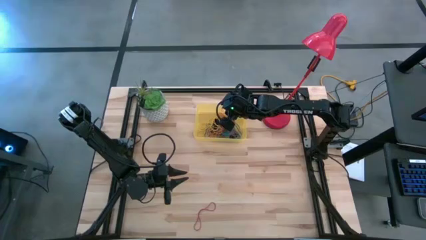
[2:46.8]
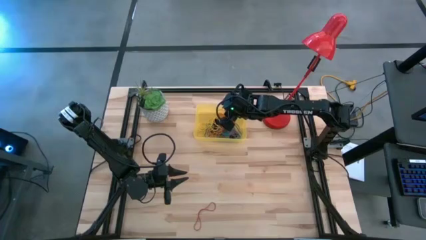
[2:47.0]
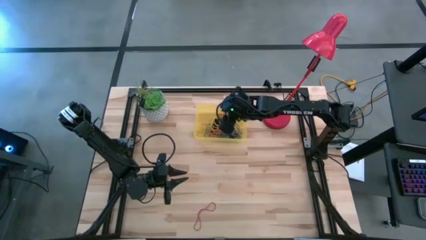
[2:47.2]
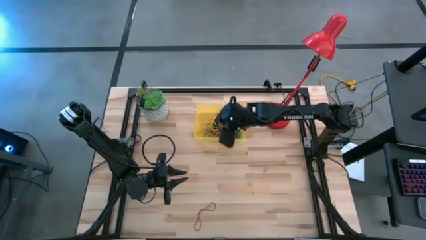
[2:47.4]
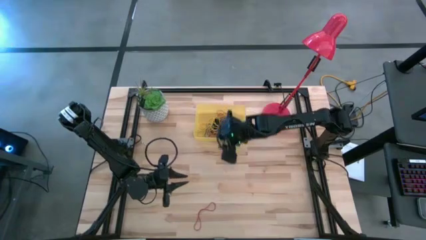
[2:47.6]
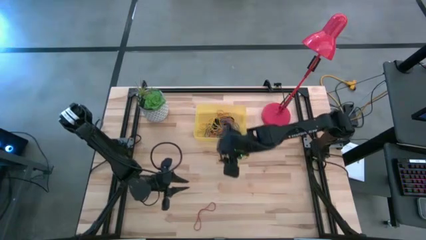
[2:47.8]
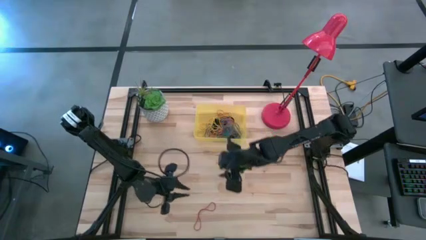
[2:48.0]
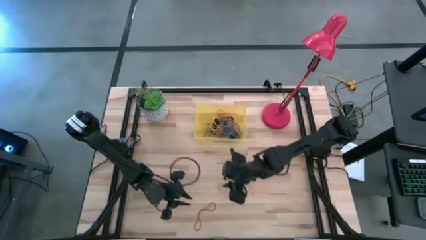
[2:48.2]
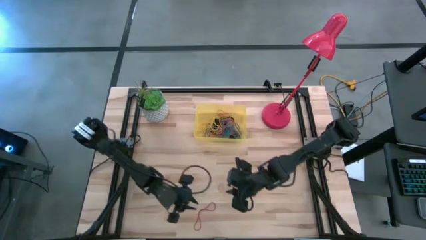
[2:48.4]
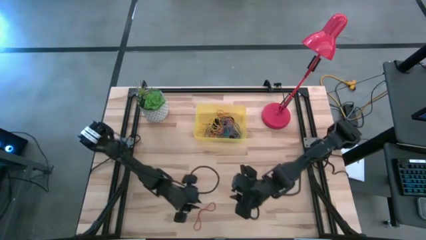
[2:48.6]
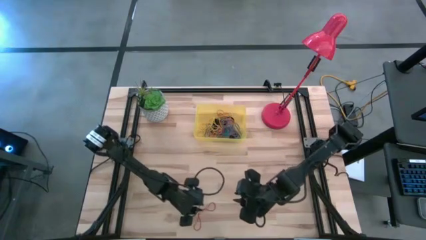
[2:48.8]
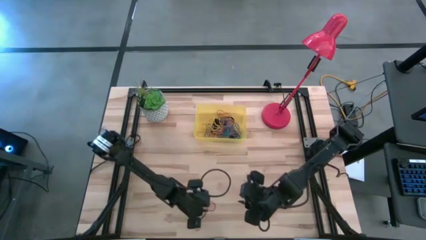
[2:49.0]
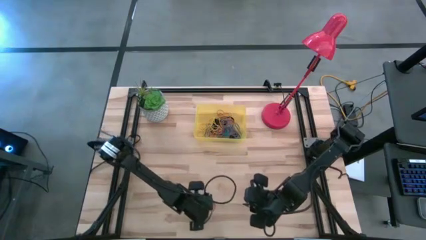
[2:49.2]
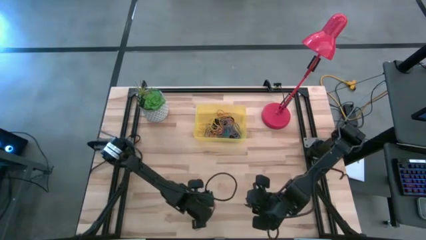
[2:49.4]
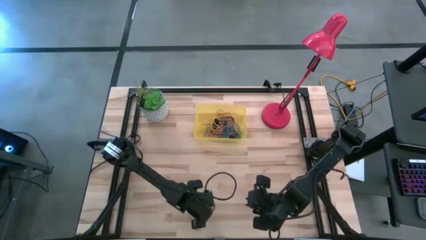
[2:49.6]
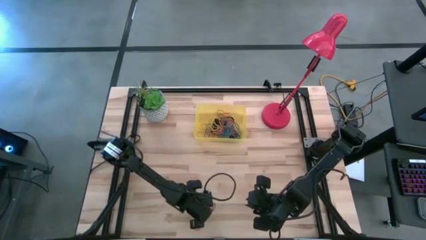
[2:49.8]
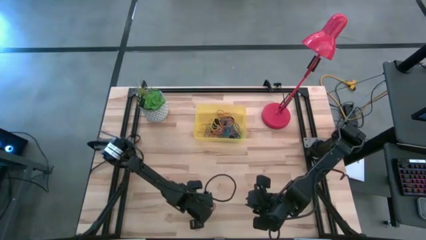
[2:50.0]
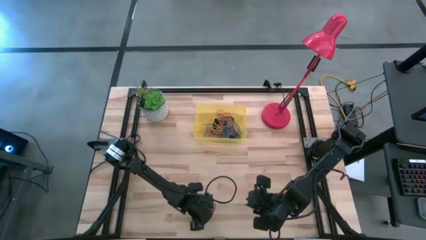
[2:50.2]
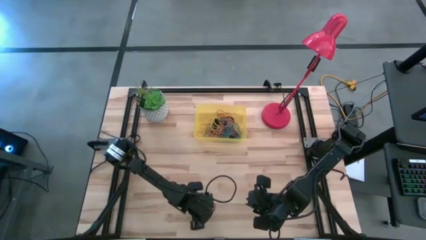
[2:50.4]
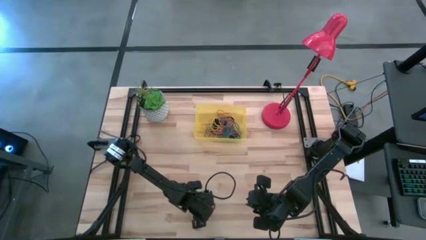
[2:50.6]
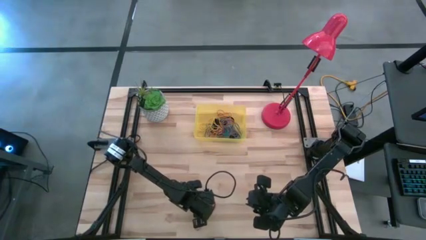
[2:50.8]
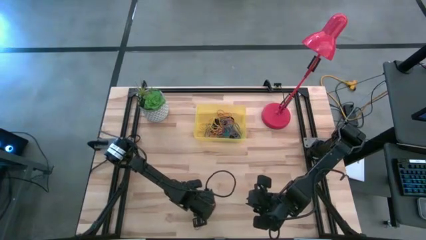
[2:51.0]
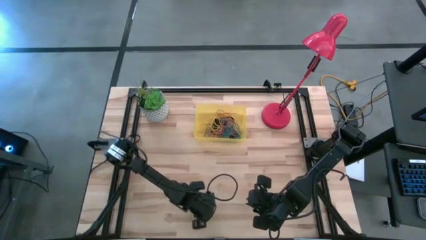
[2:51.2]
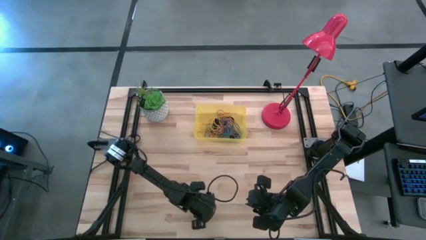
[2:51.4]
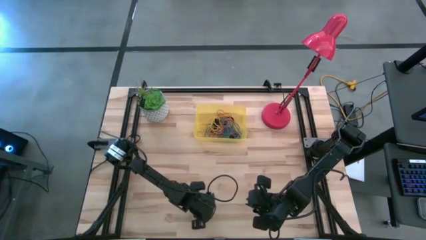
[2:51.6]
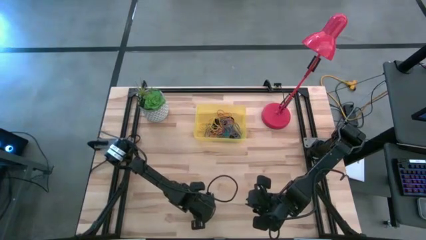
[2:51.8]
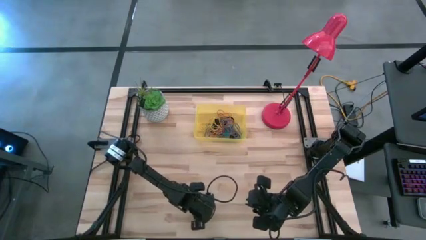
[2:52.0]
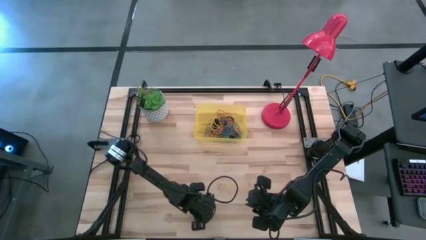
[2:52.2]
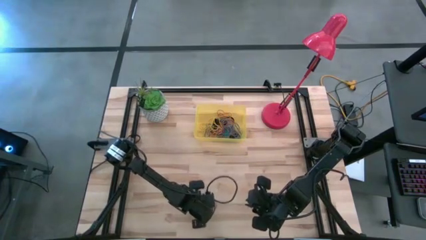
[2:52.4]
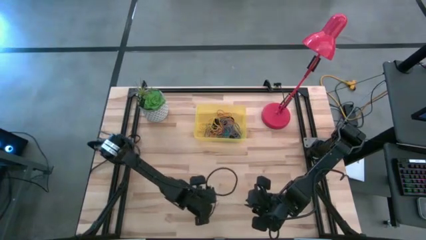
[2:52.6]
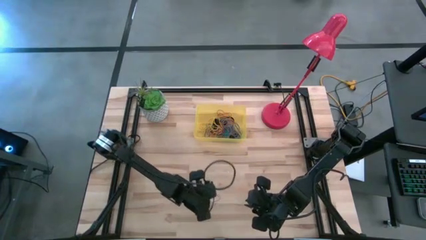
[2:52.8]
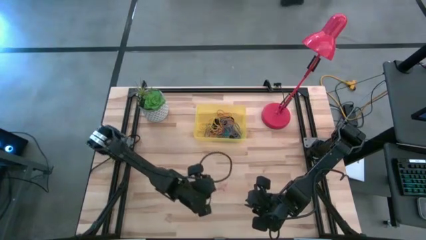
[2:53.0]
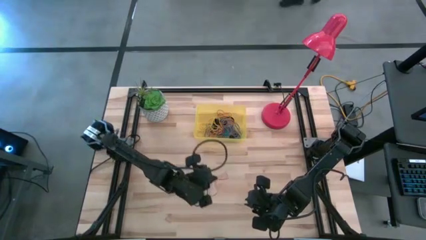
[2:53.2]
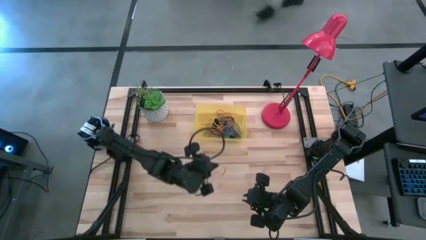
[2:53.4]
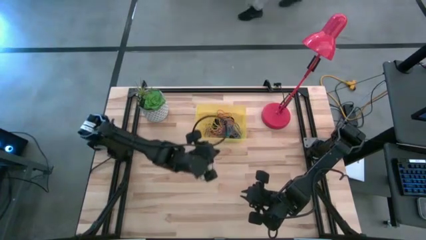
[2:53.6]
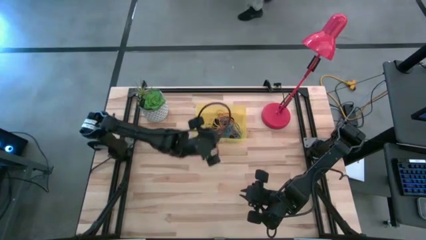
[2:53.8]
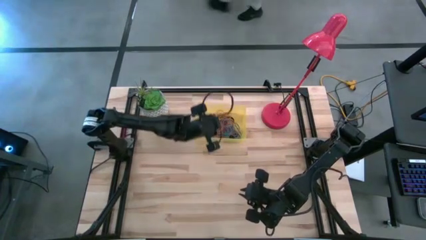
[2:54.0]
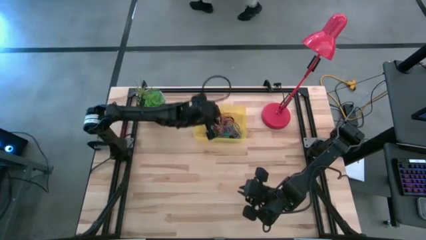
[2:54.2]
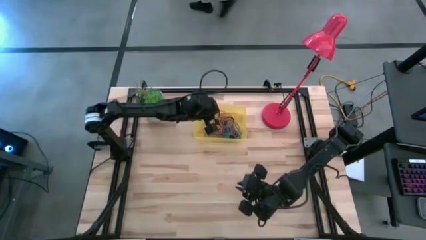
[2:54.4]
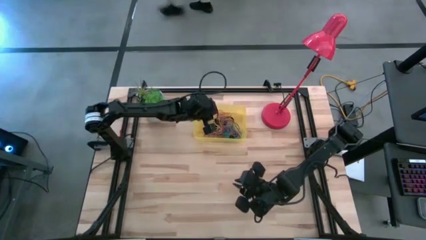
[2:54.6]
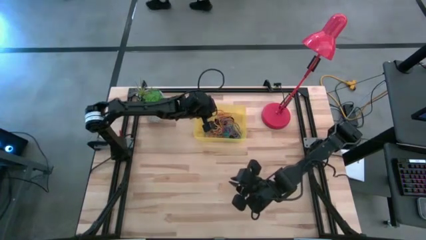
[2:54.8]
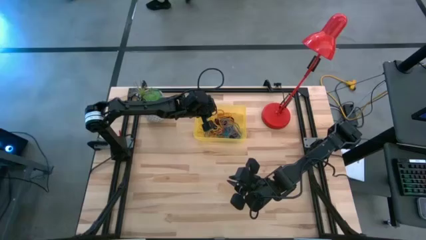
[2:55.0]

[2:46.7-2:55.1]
Task: Pick and place rubber bands into bin
Put the red rubber band into the yellow bin
